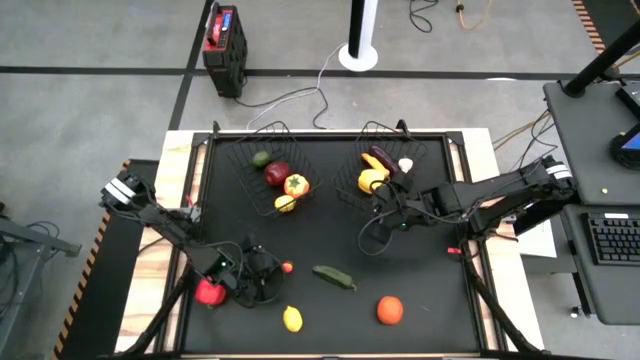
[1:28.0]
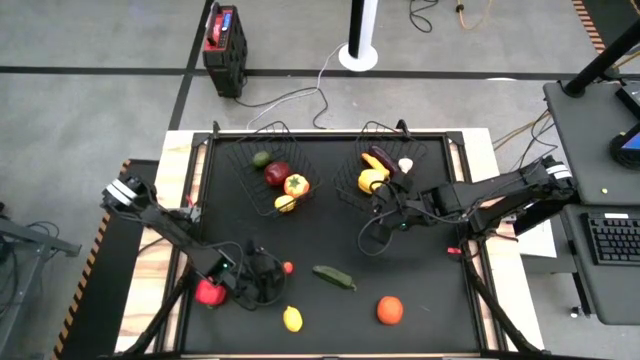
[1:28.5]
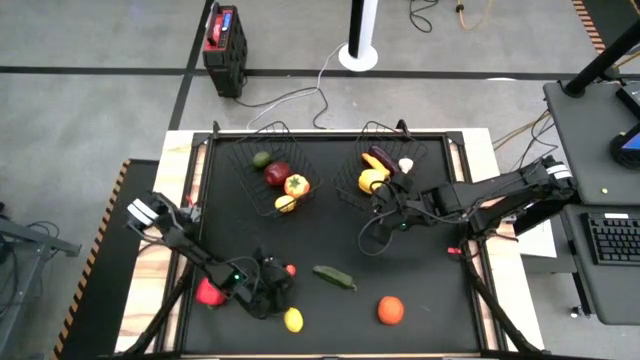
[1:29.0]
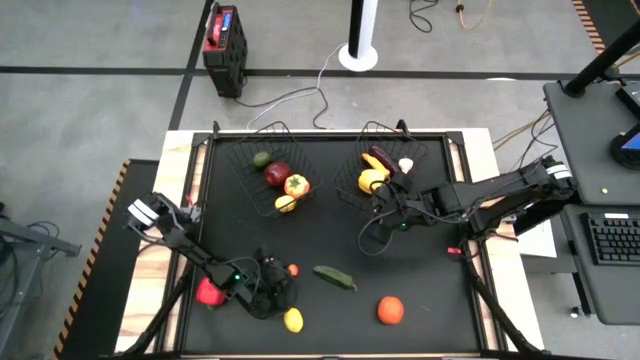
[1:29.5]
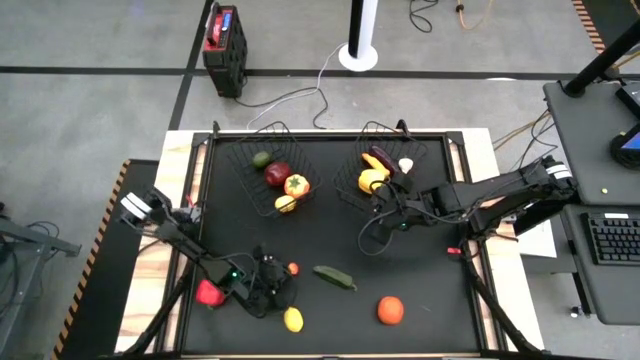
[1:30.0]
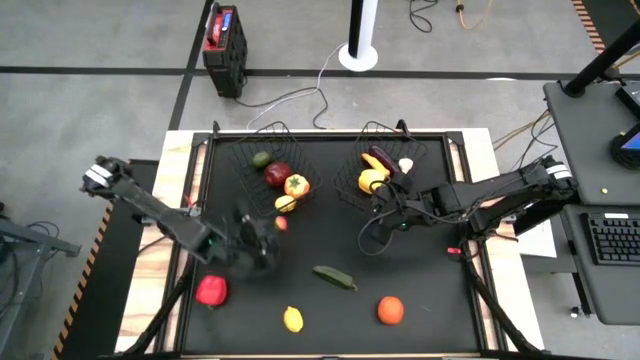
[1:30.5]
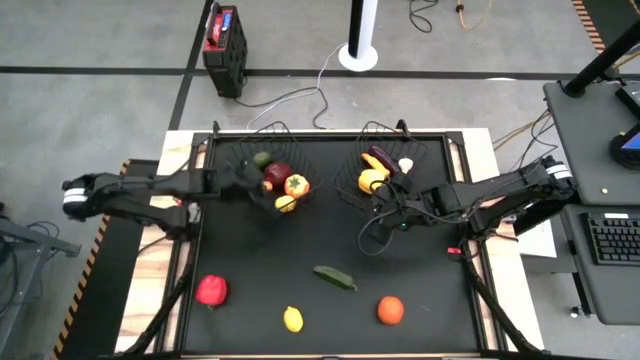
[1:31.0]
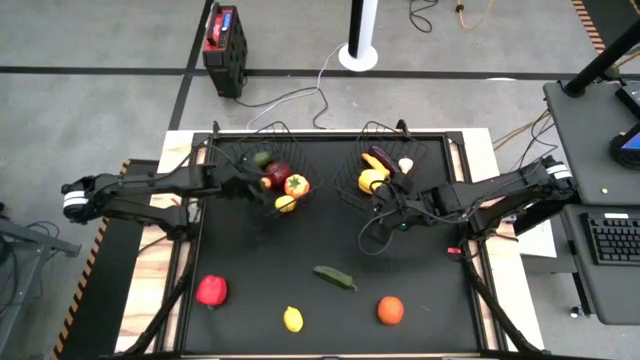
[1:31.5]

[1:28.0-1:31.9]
Task: Sort produce into baskets
Put the persimmon into the left black wire basket

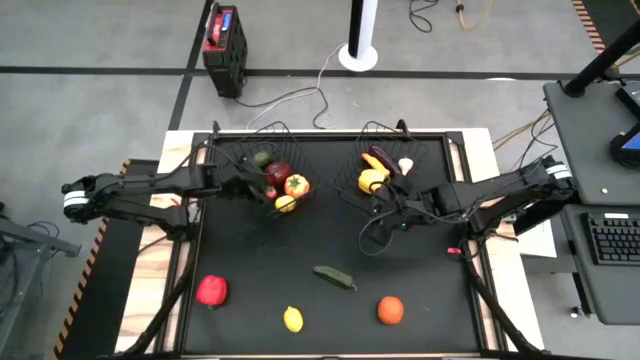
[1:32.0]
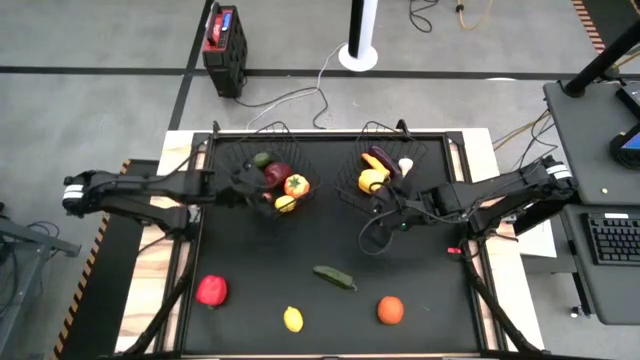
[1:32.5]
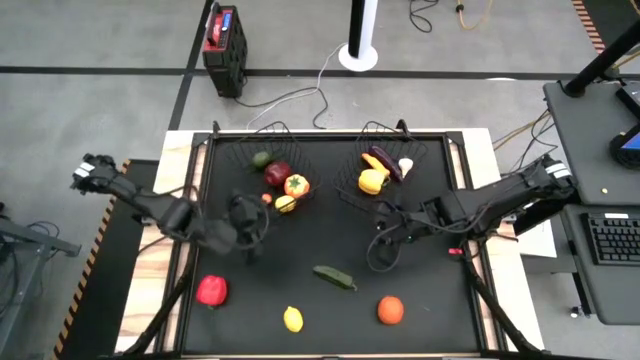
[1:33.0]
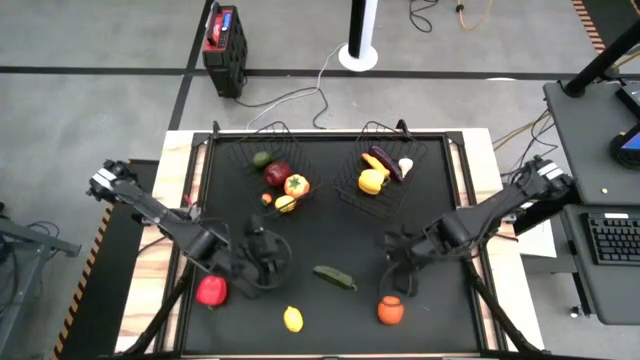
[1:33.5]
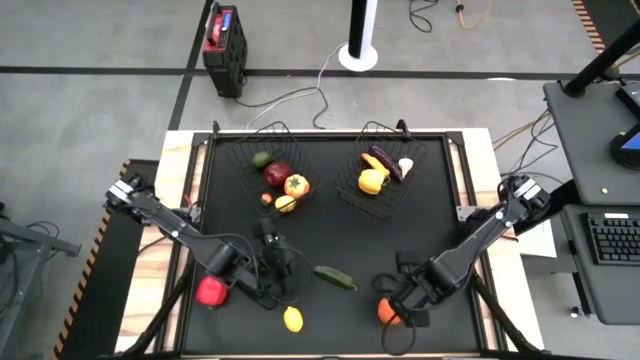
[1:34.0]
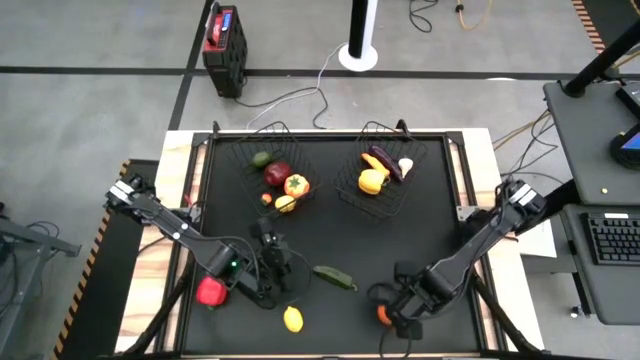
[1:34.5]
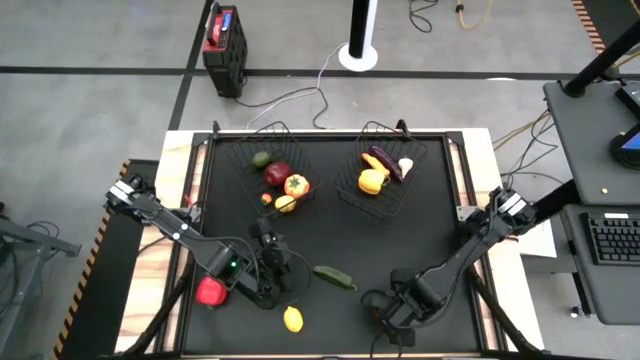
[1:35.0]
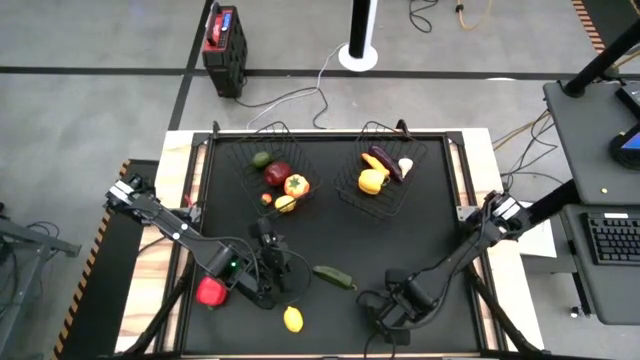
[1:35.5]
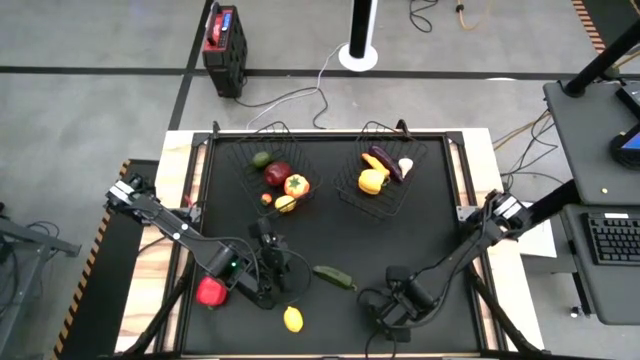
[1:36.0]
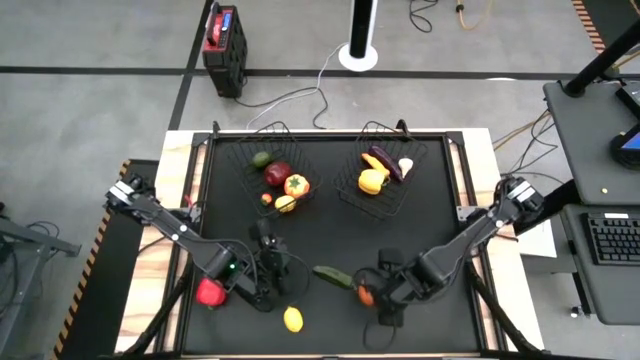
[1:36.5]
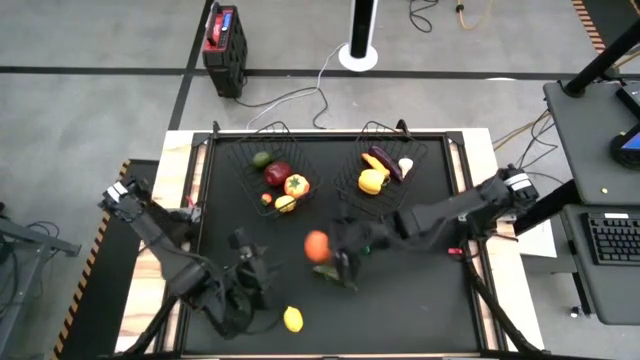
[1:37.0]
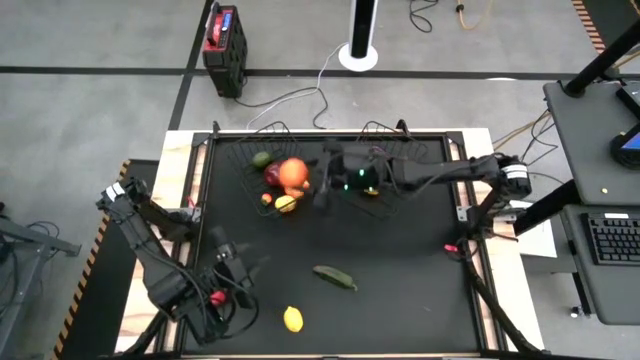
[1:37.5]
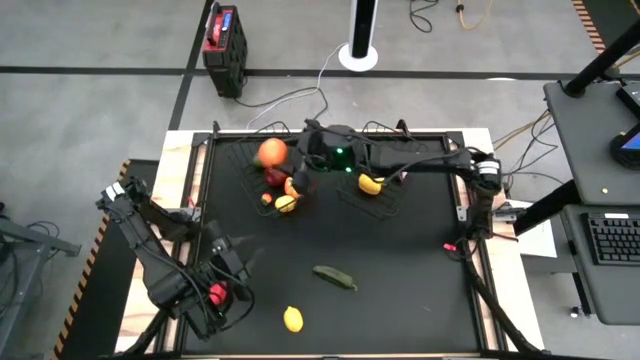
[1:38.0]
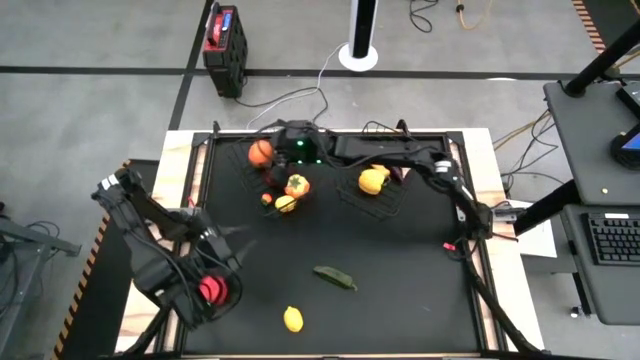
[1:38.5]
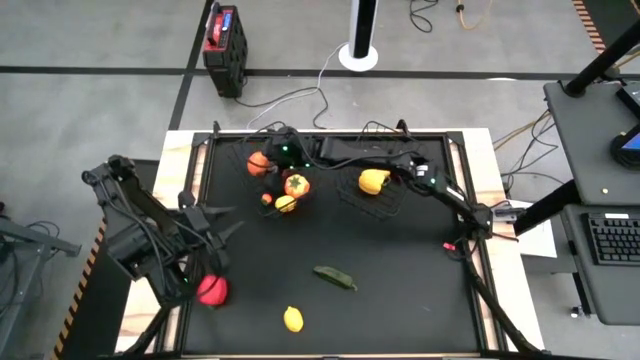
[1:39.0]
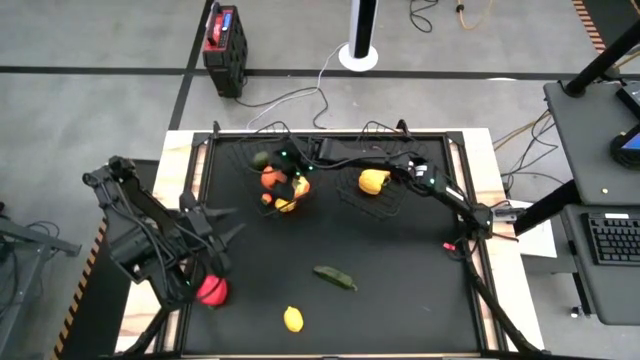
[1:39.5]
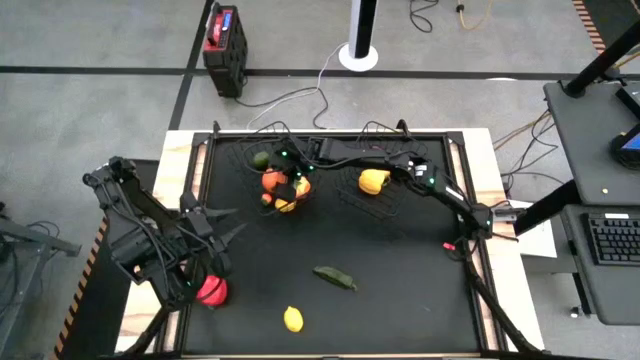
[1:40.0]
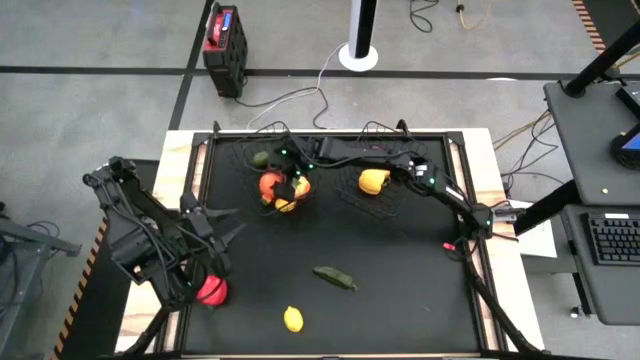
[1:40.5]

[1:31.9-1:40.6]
Put the orange into the left black wire basket

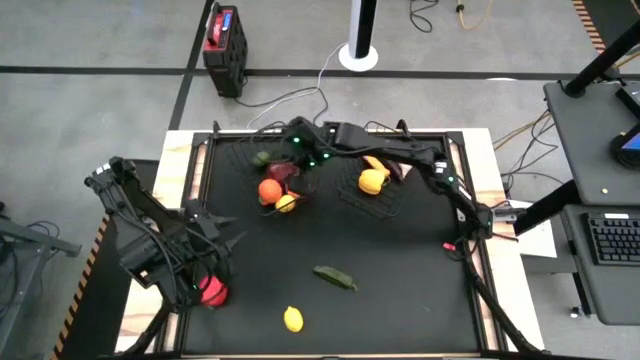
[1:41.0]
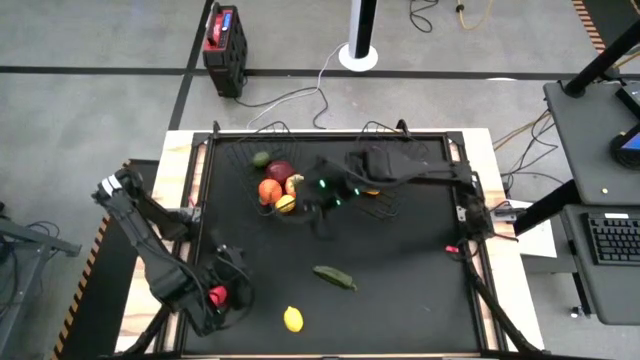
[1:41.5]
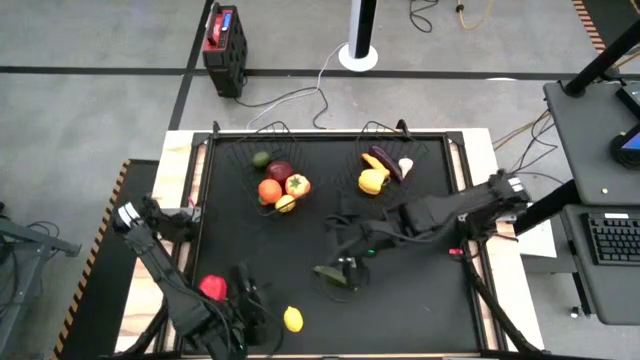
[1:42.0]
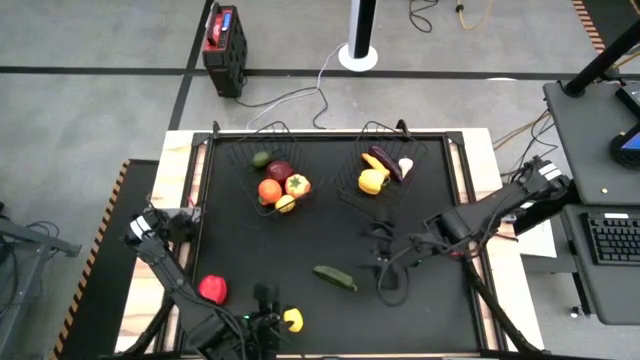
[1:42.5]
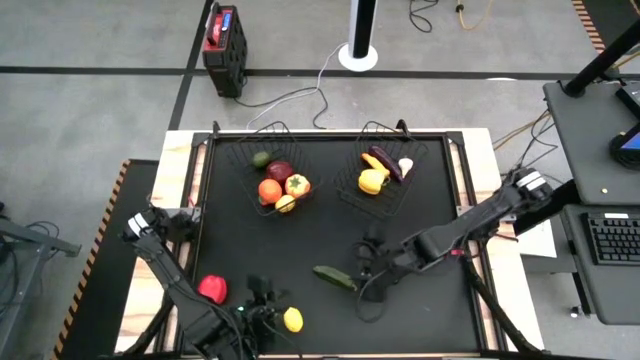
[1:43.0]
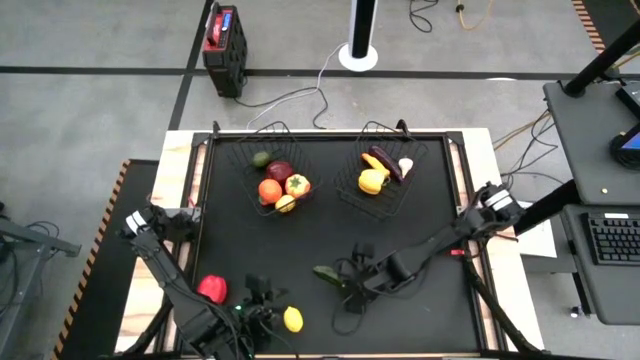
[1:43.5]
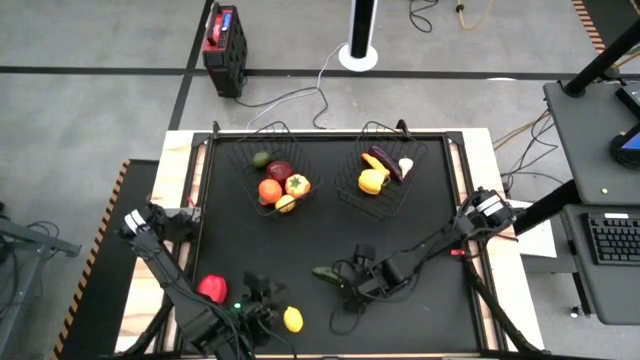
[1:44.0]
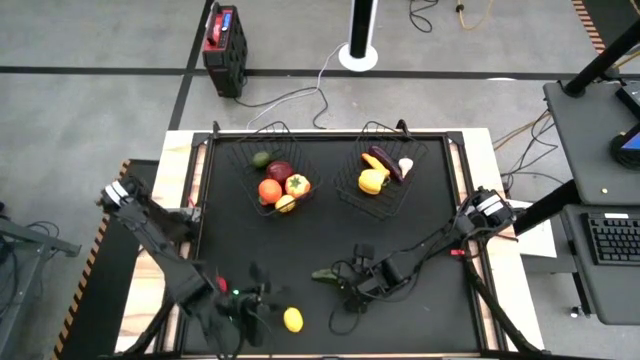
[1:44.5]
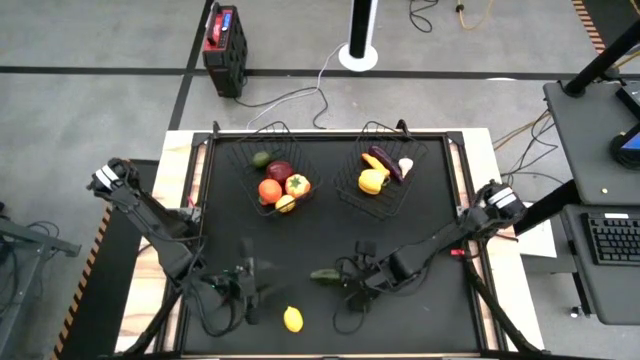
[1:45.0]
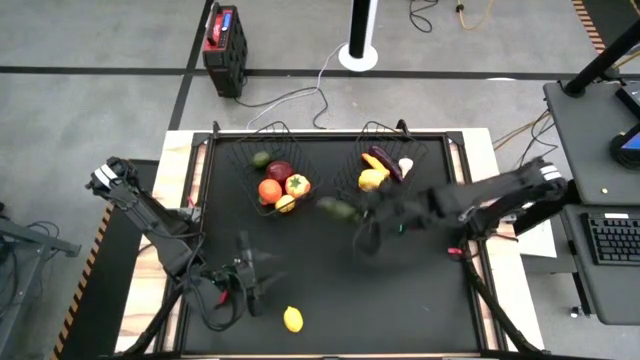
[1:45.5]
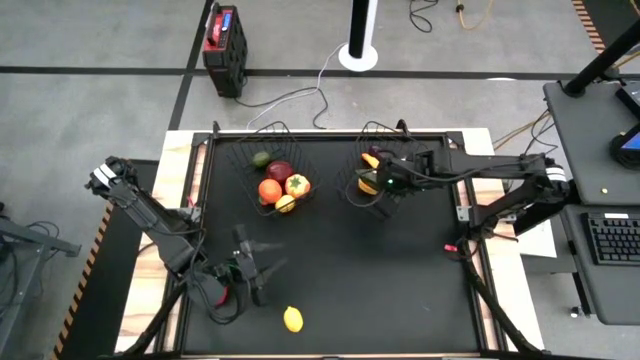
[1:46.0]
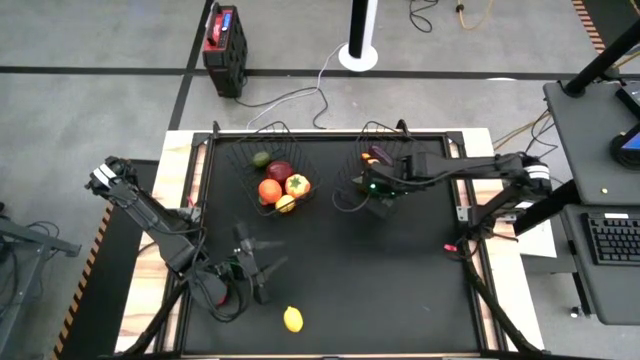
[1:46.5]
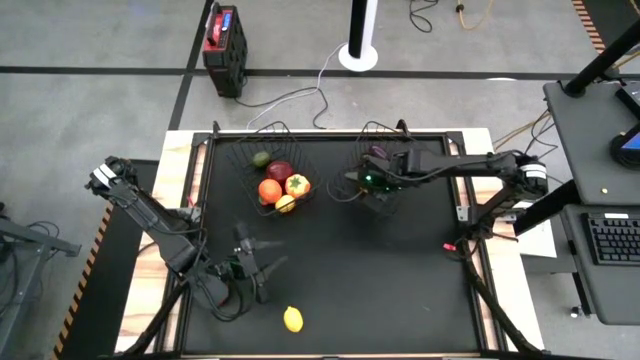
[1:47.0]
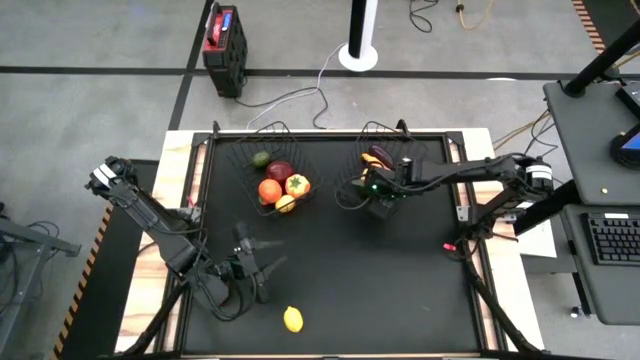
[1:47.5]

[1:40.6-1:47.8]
Put green chili pepper into the right black wire basket

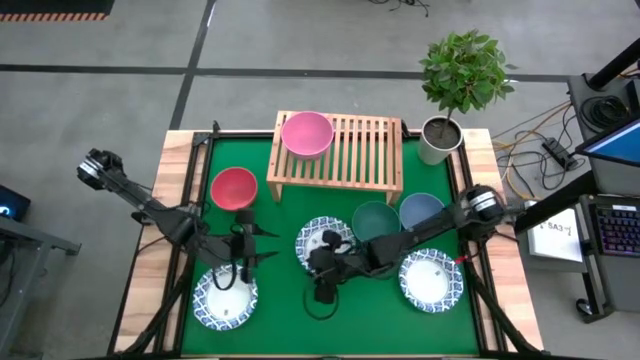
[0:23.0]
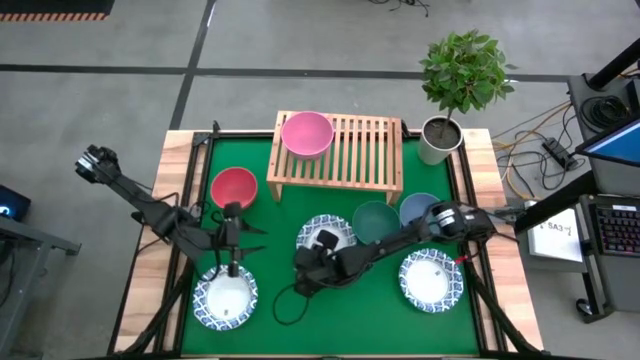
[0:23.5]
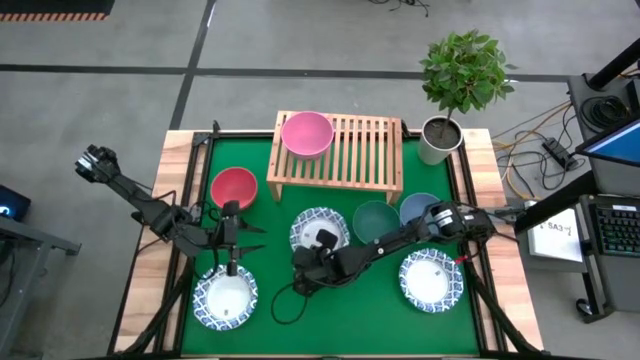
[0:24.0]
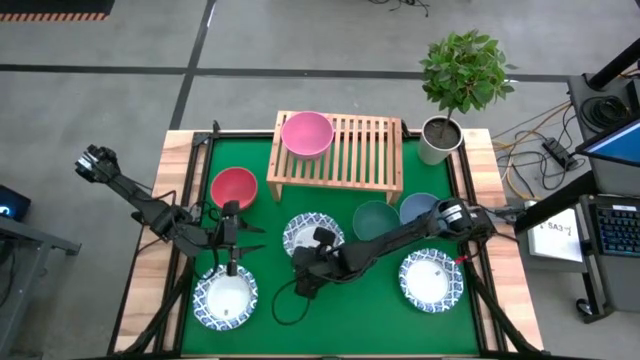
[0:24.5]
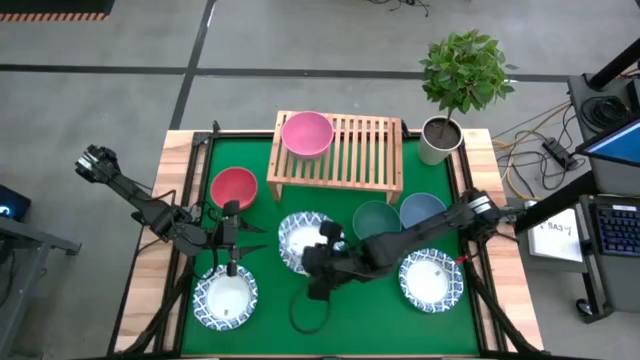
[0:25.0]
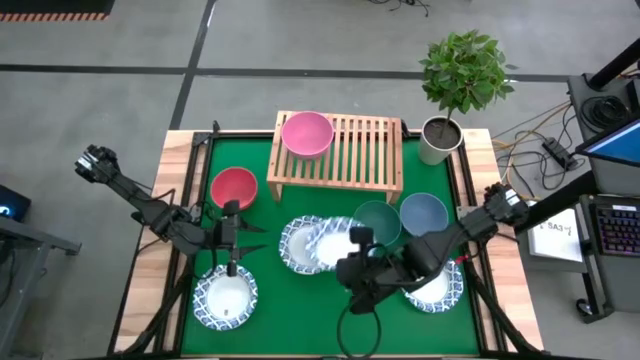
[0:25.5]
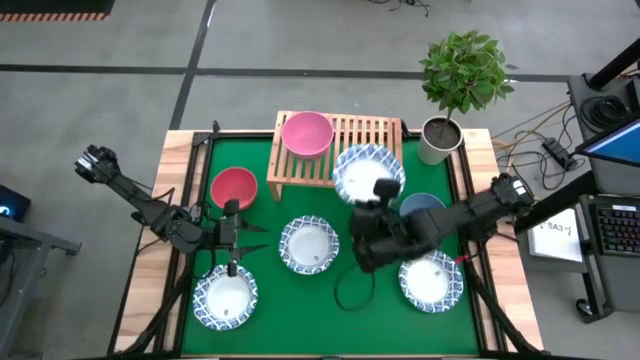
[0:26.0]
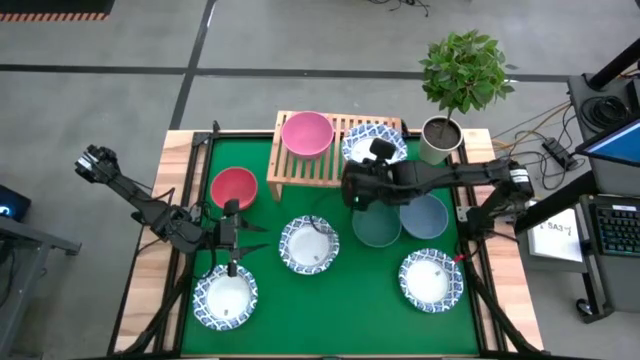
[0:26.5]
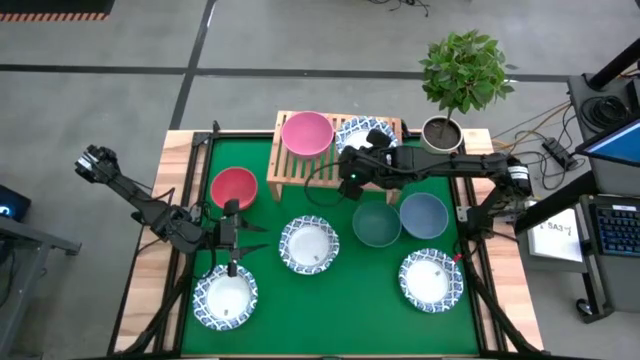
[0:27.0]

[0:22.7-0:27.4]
Task: Place and stack bowls onto a shelf
Put the white bowl on the shelf
